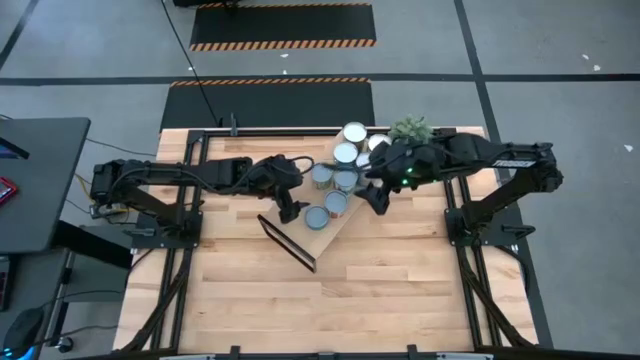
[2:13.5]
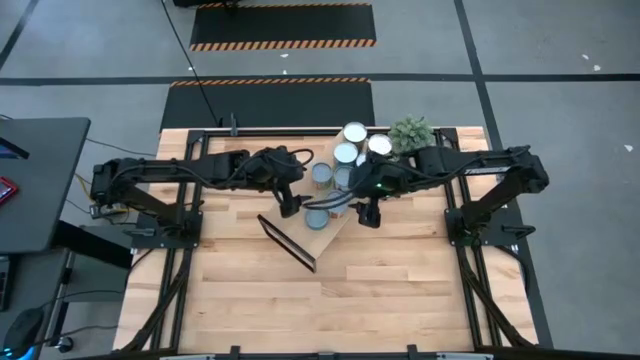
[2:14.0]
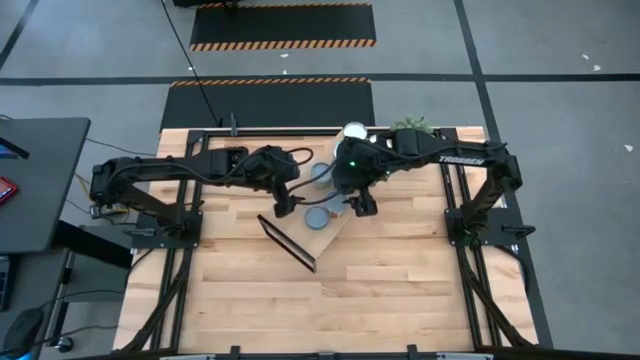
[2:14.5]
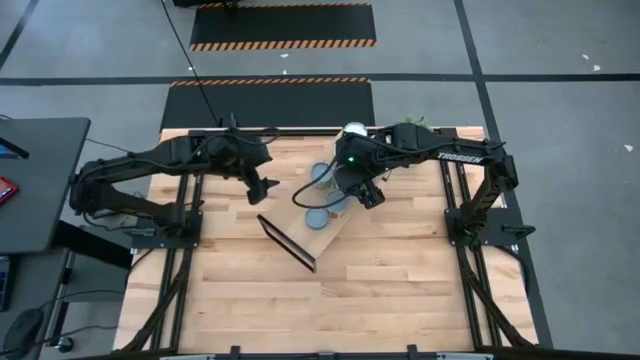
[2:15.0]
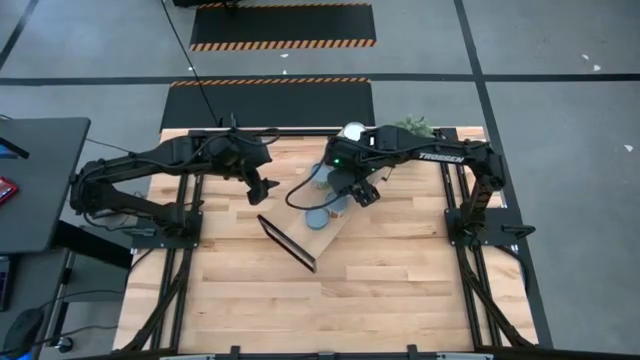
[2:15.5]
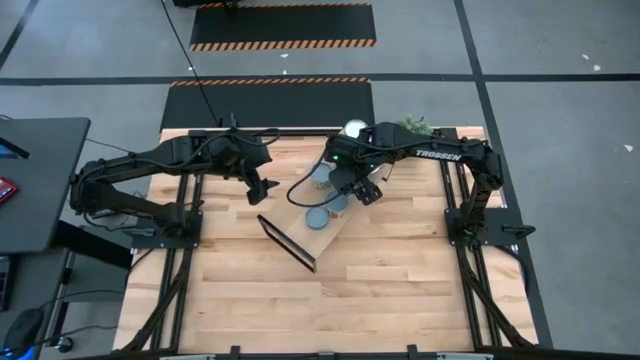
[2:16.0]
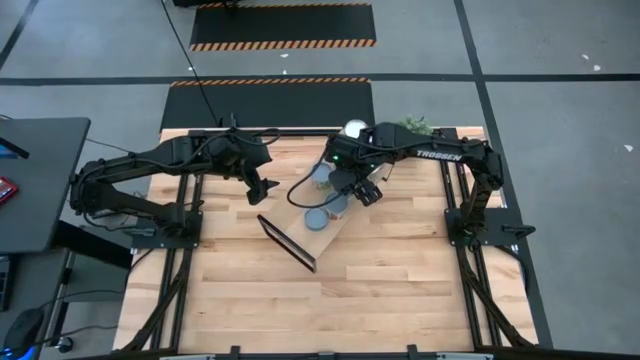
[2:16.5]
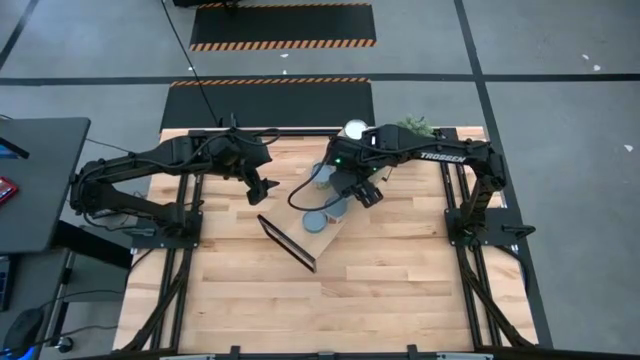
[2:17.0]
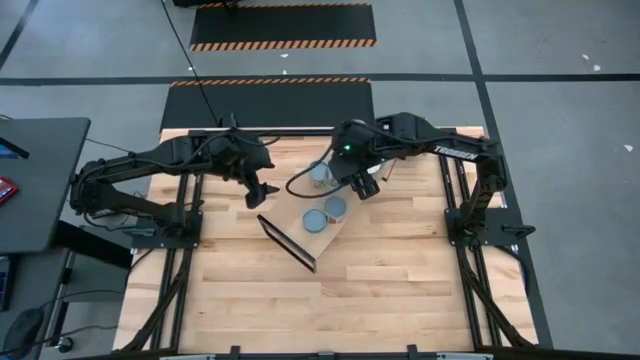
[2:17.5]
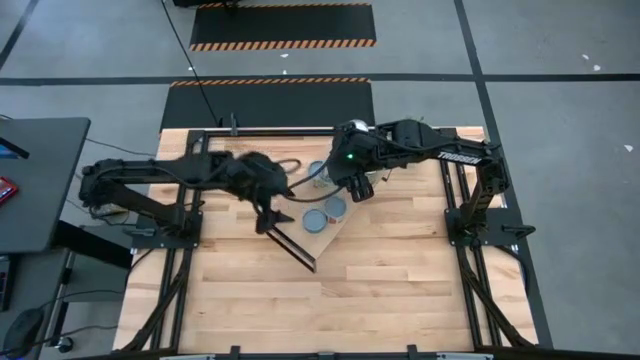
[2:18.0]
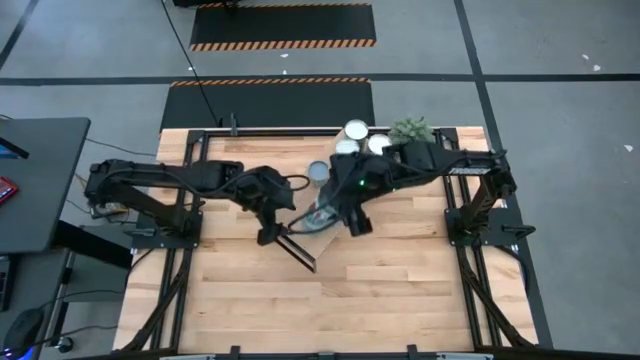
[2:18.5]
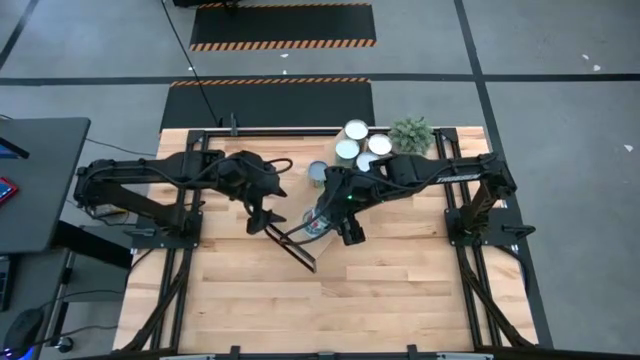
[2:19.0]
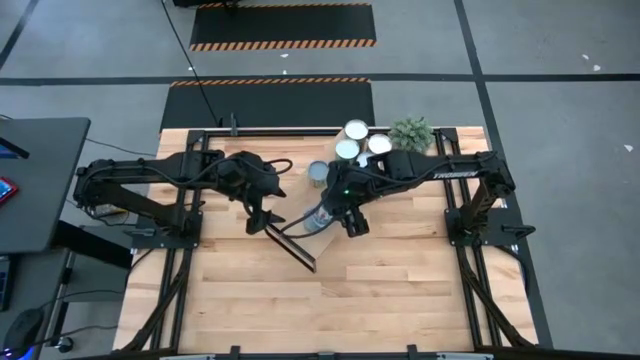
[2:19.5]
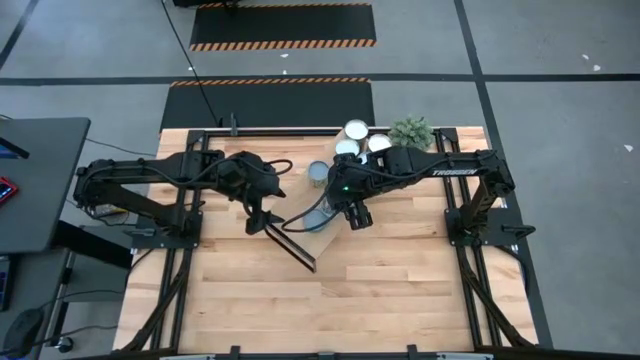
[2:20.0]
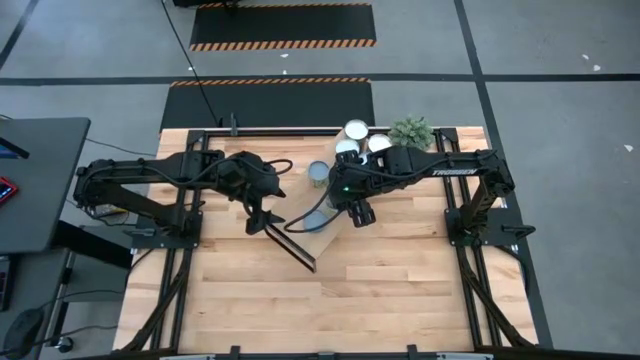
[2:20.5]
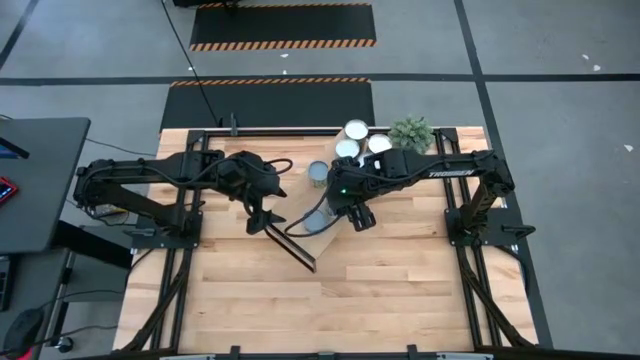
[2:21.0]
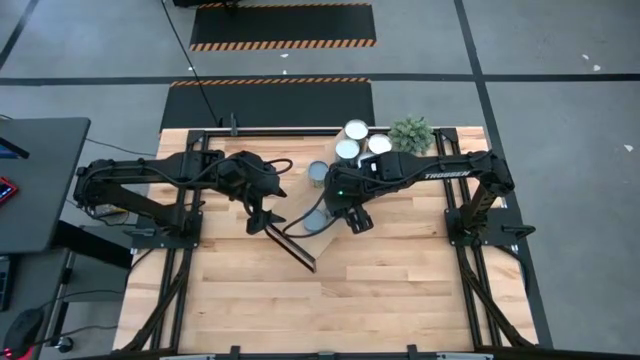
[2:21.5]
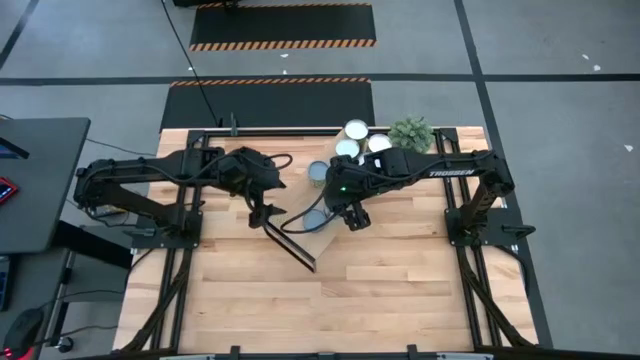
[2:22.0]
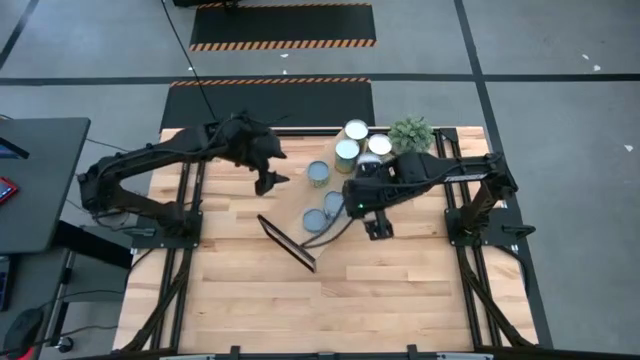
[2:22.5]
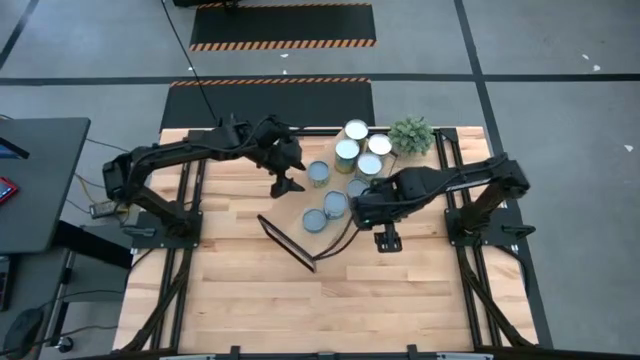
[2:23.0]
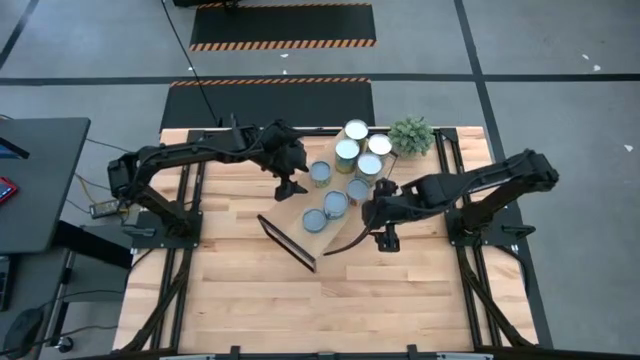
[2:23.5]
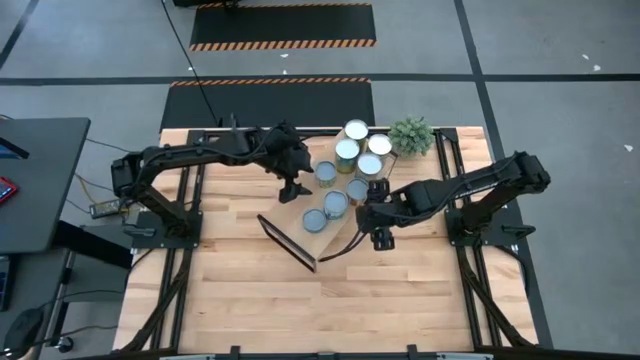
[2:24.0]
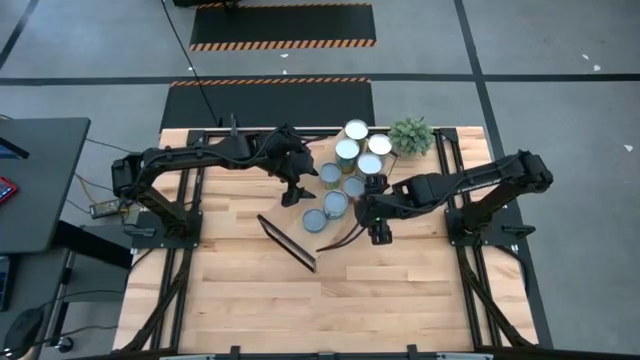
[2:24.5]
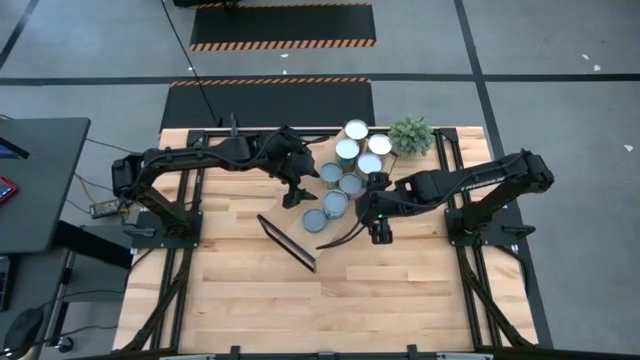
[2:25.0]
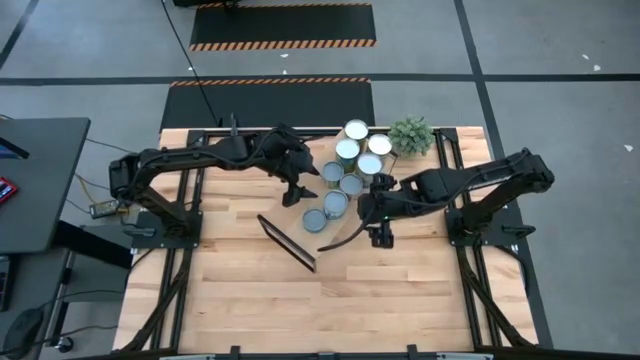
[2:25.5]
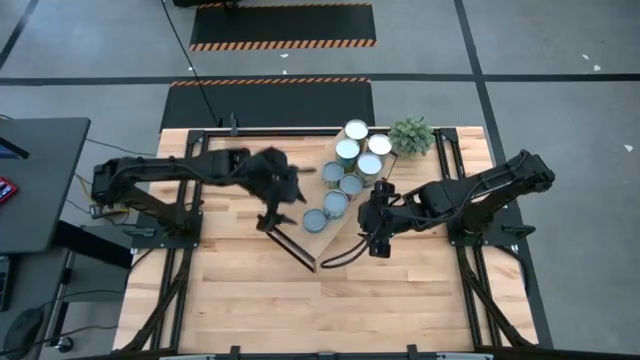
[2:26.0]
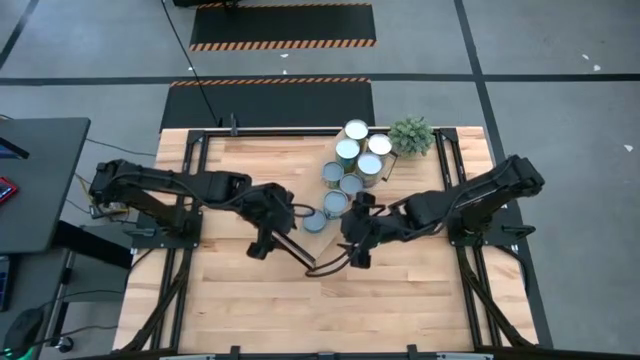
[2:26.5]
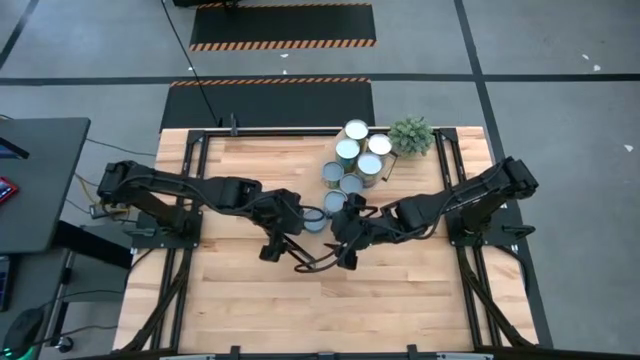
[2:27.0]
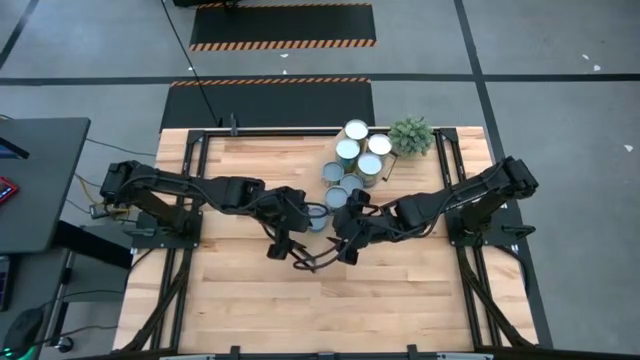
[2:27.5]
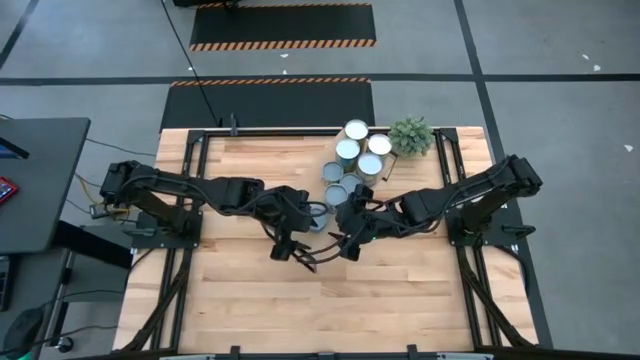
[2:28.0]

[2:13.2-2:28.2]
Task: Pick and place cans onto a shelf
Adjust the canned goods on the shelf

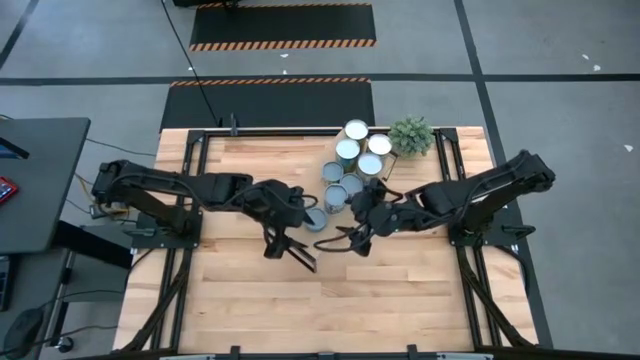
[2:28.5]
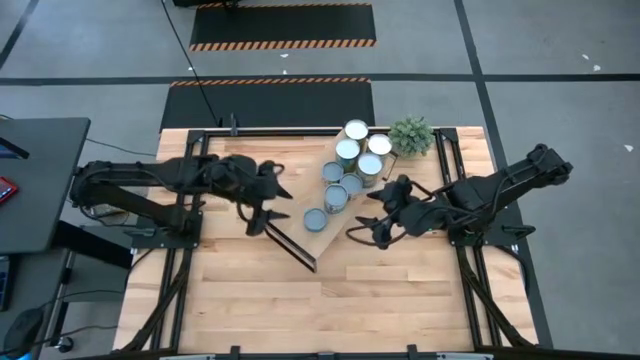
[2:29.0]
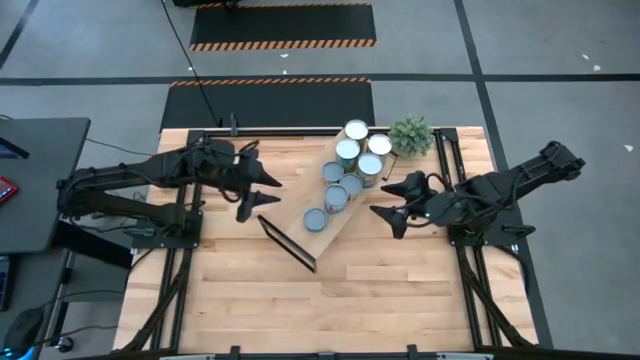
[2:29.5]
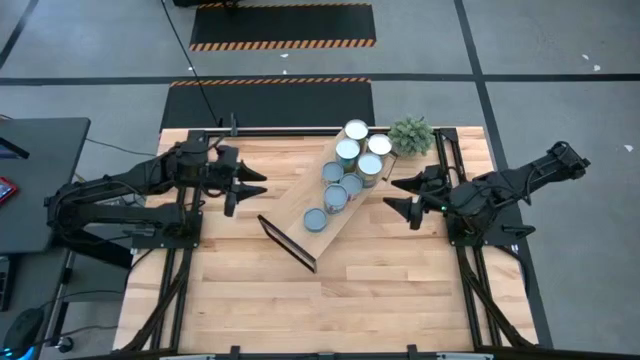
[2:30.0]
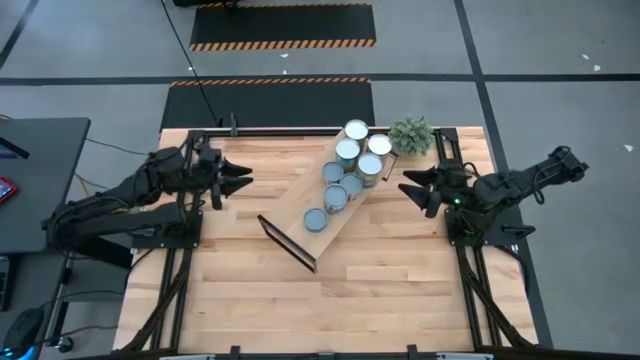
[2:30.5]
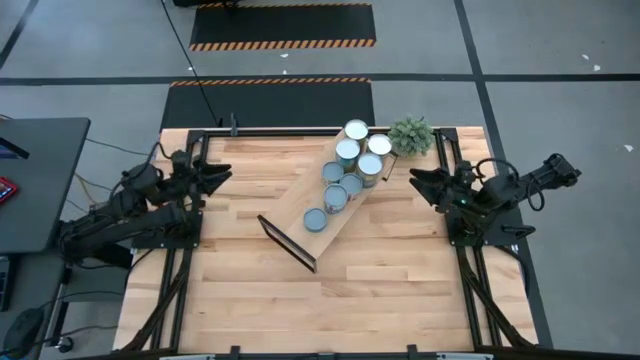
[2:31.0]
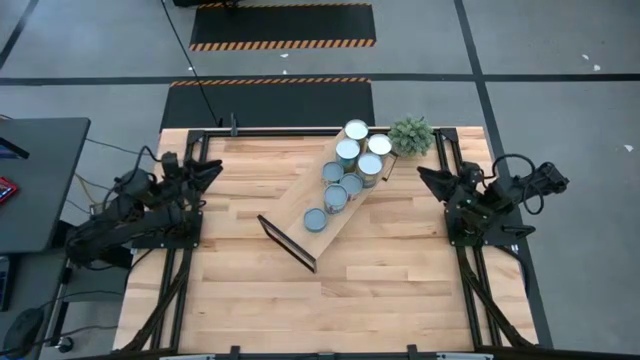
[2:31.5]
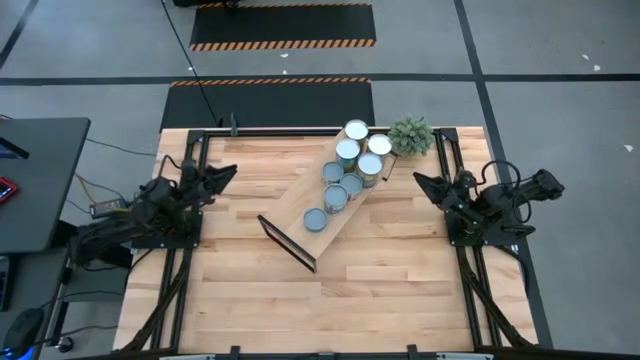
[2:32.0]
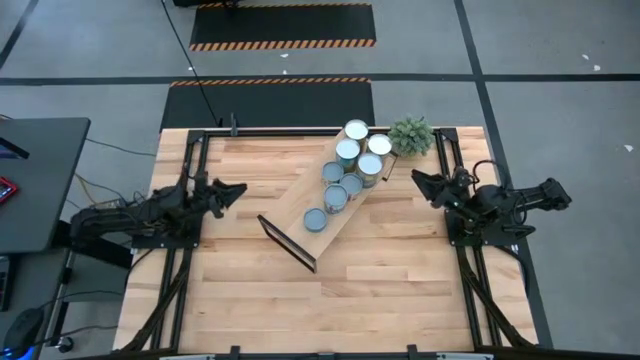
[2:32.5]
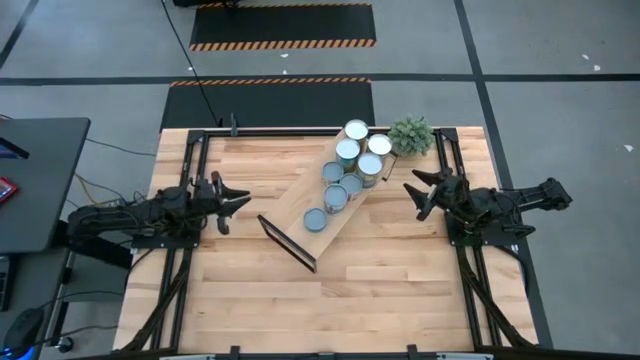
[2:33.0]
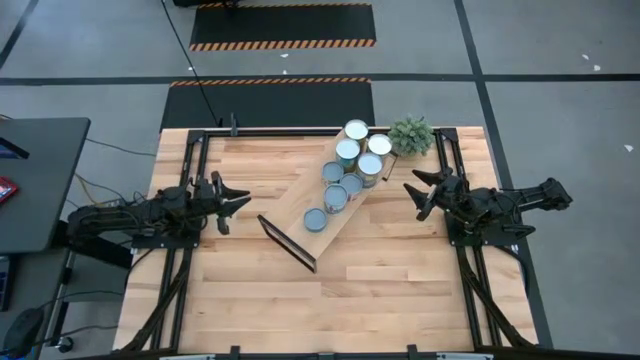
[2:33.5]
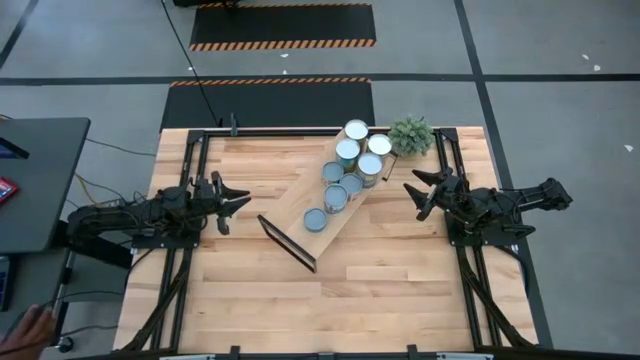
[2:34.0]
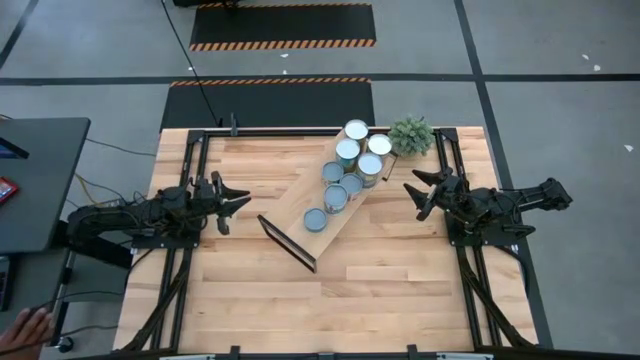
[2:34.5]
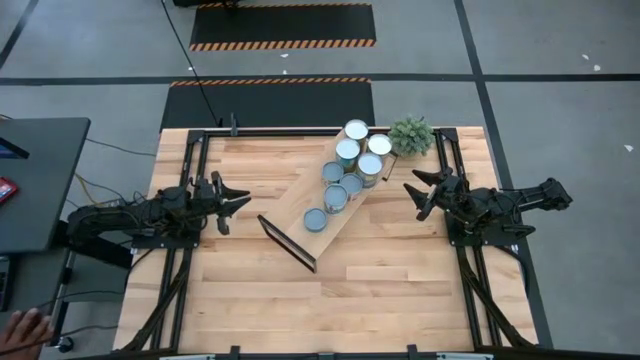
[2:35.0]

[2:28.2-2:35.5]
Return to Home Position
